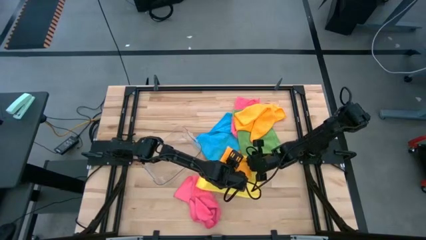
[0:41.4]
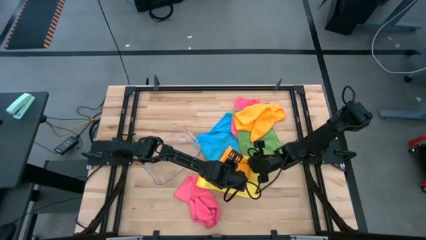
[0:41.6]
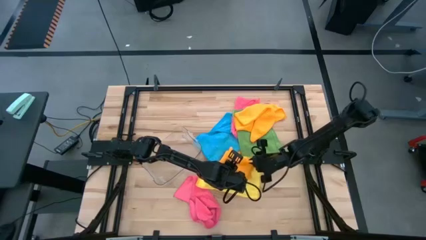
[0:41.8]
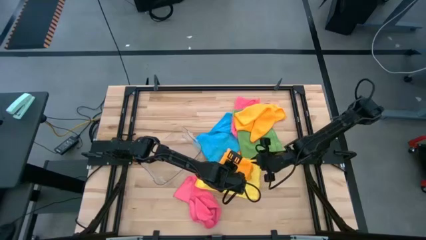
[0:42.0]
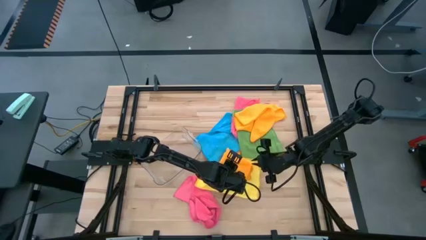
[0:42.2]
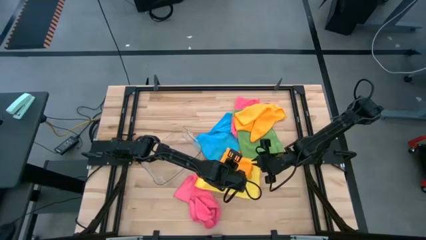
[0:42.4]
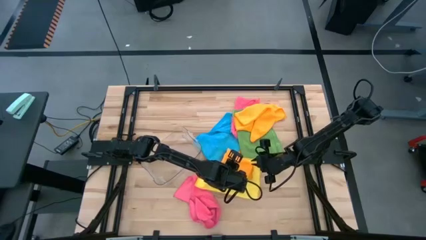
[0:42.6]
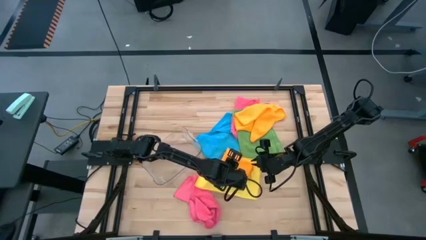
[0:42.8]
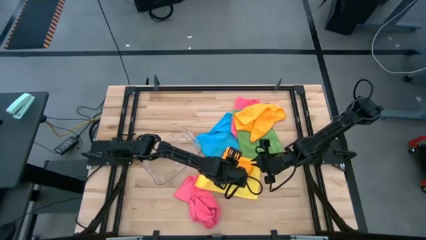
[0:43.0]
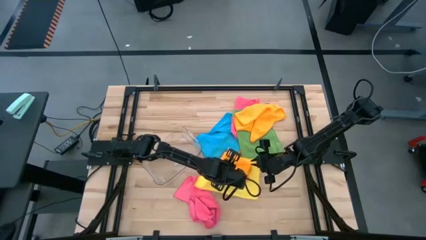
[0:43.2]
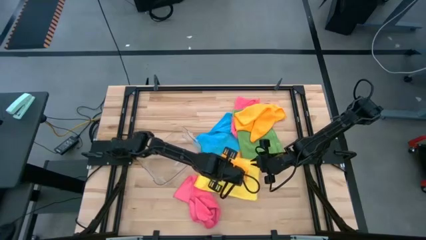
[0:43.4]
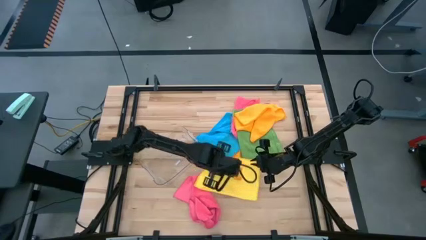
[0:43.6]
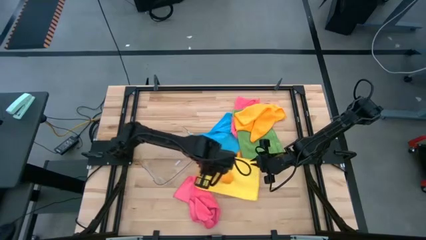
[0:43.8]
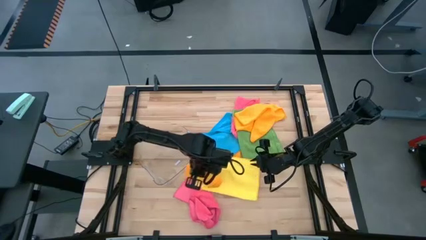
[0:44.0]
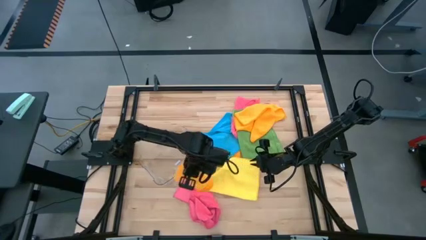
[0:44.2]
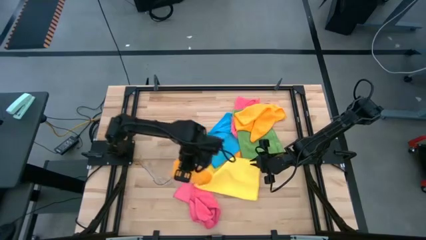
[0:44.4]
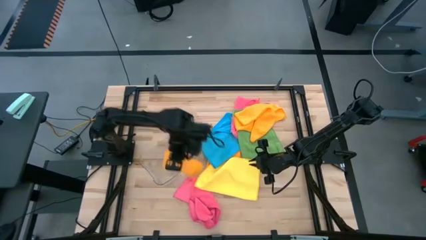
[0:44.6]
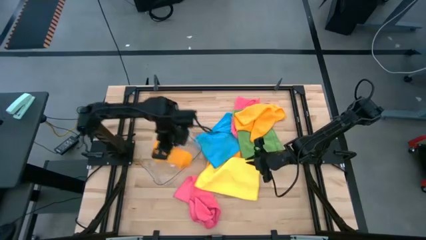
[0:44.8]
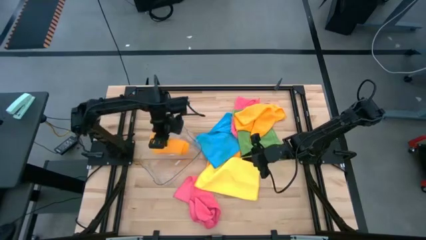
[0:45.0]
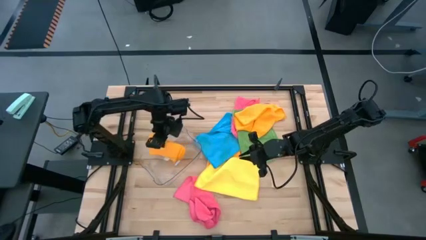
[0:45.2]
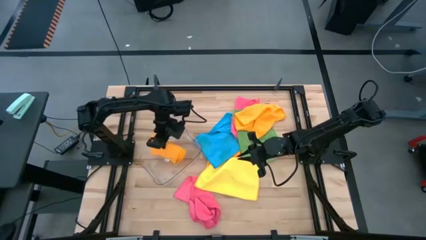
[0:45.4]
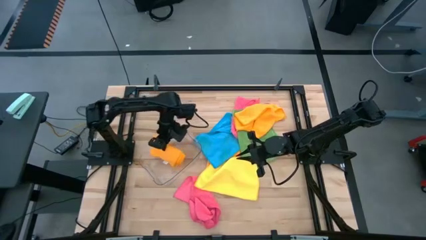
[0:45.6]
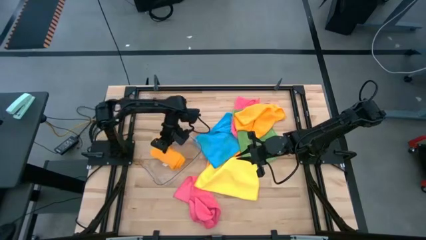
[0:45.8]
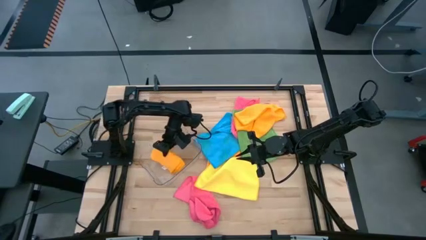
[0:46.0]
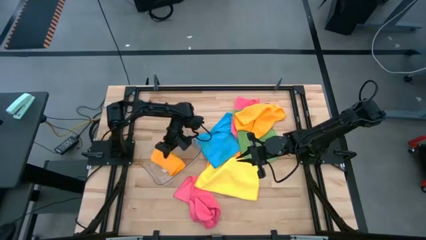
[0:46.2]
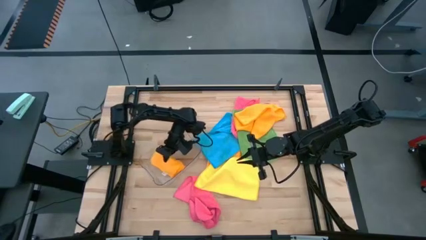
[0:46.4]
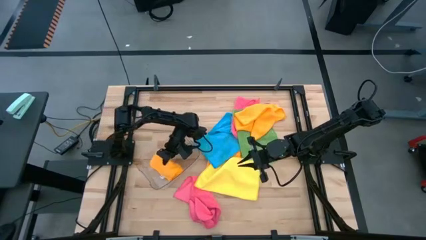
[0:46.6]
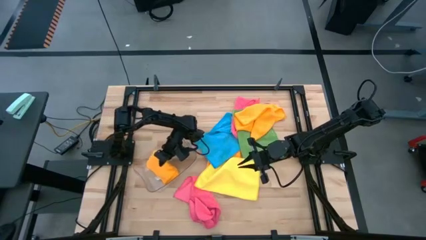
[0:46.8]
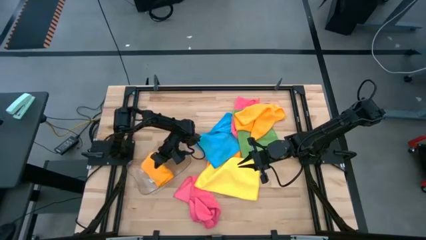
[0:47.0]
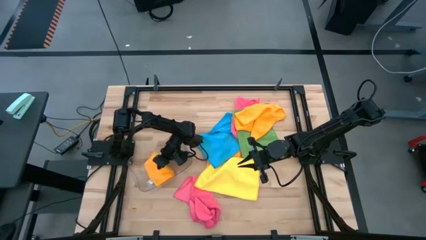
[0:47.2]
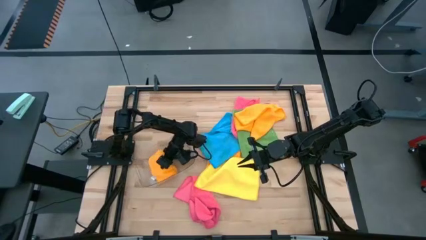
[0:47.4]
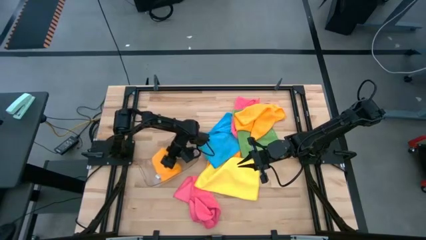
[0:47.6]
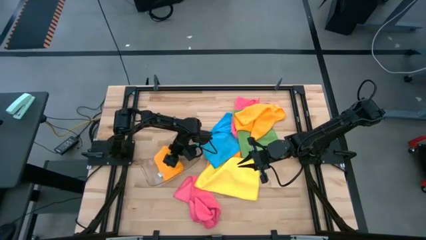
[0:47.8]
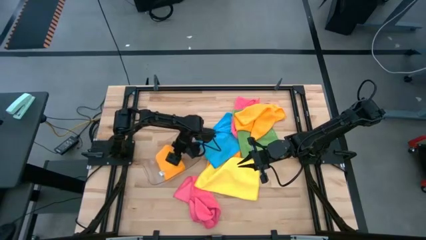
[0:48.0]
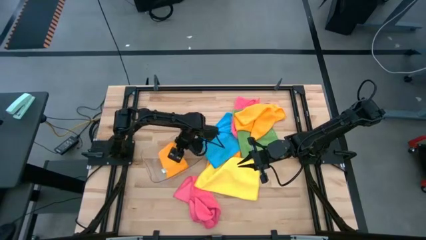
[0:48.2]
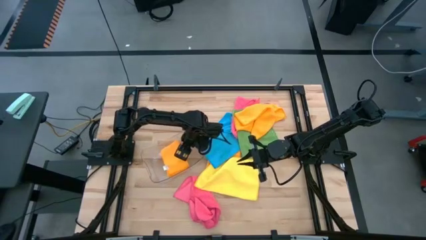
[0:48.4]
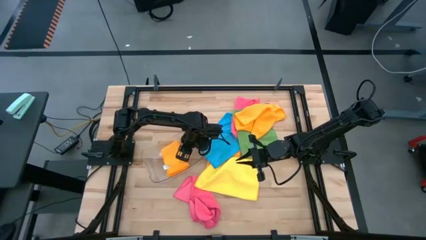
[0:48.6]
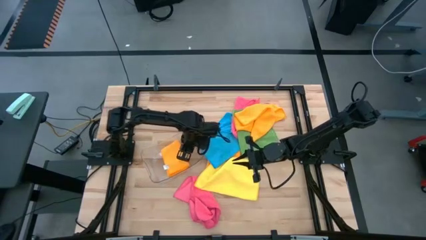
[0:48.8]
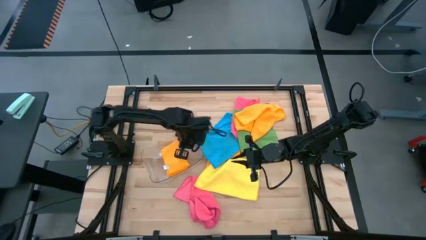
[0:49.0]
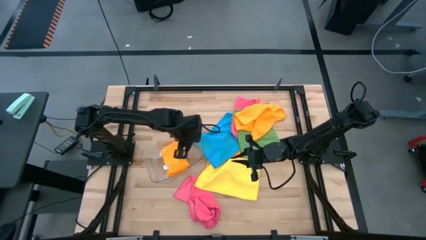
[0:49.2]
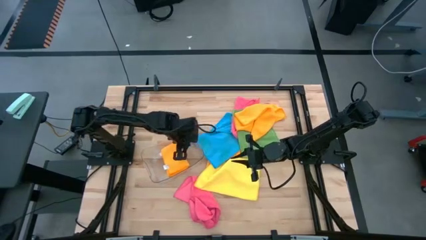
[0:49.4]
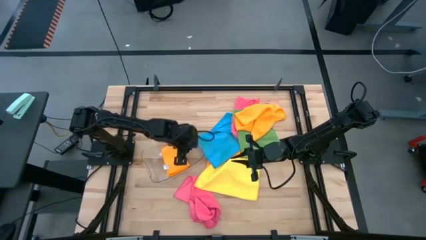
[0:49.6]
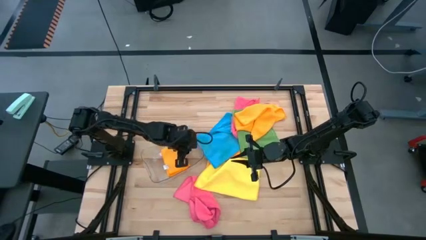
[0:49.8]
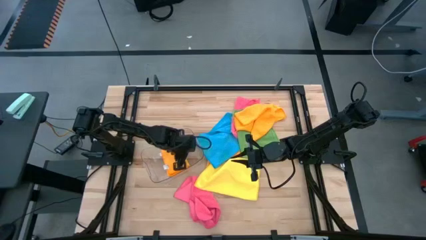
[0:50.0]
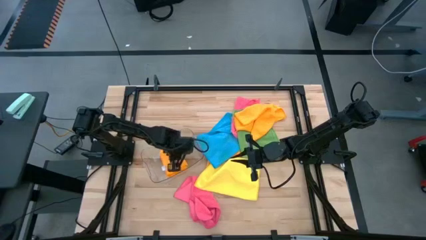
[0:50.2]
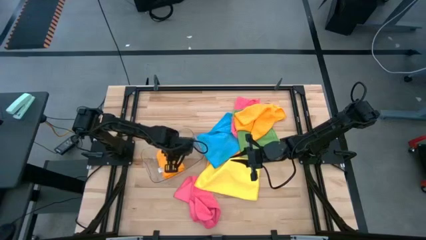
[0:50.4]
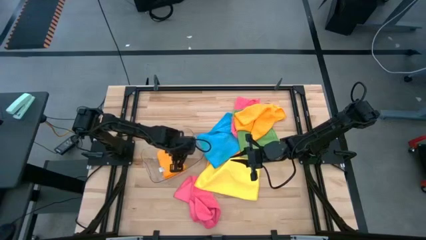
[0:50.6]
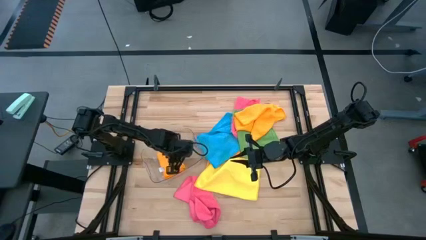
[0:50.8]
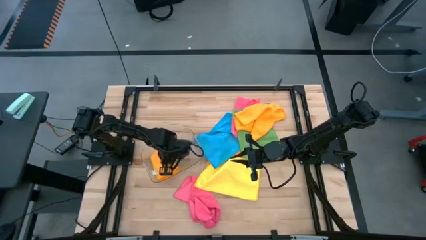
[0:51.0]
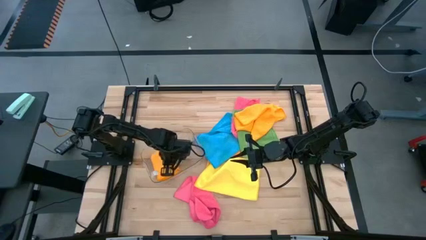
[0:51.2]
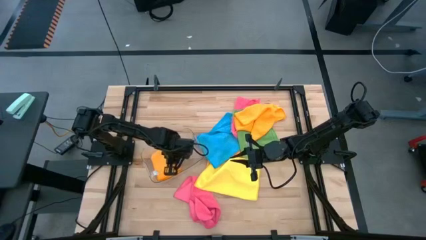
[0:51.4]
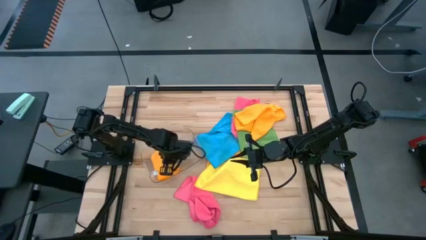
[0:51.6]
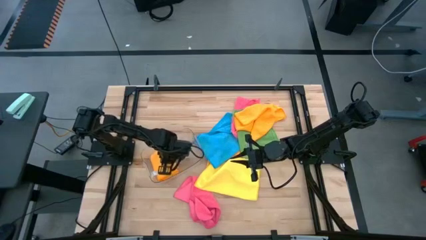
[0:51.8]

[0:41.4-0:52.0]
Task: Fold microfiber towels
Put the folded orange microfiber cloth into the transparent bin
